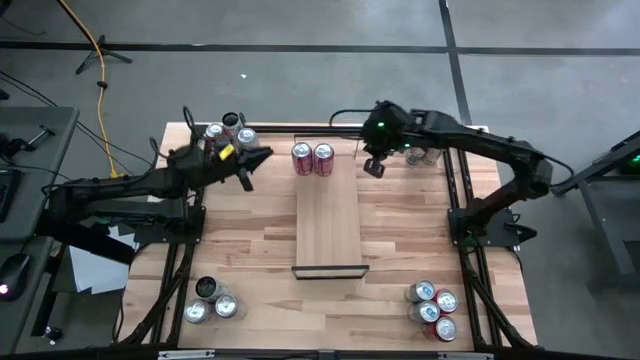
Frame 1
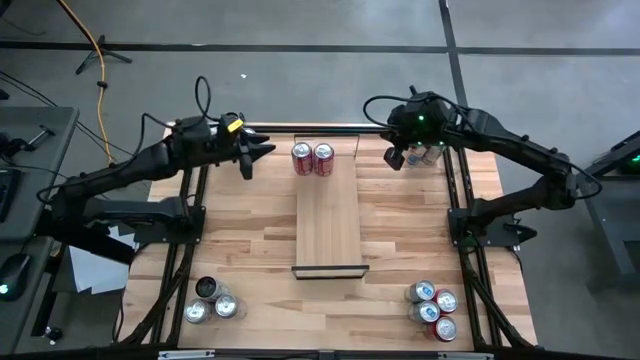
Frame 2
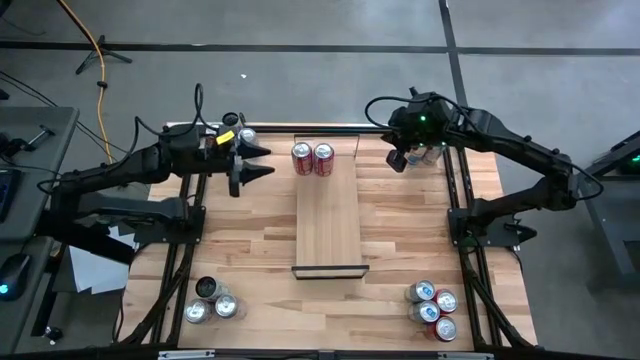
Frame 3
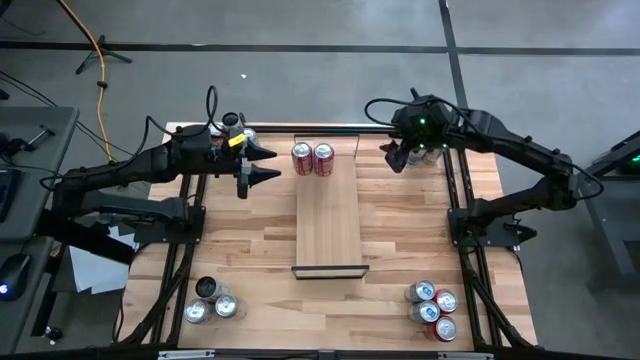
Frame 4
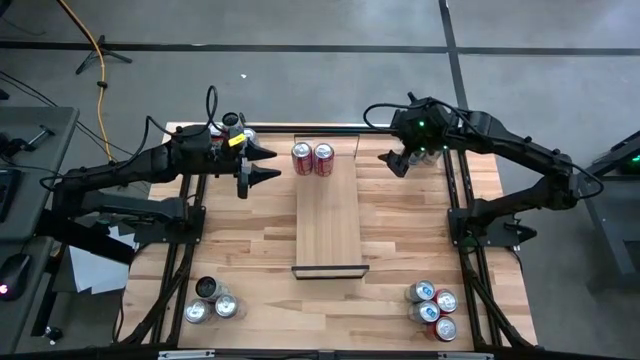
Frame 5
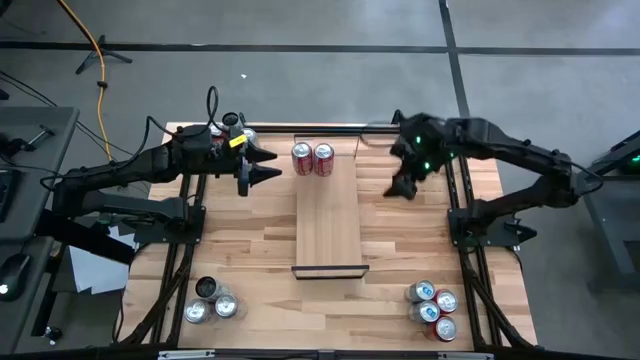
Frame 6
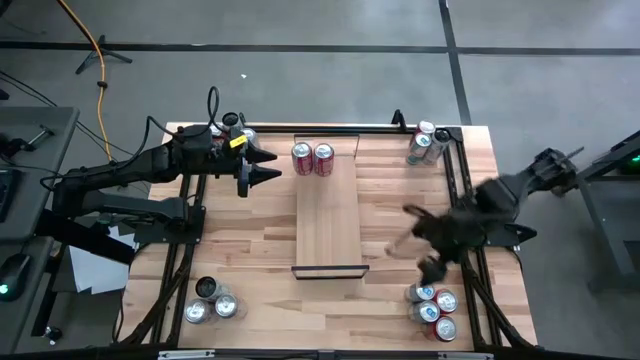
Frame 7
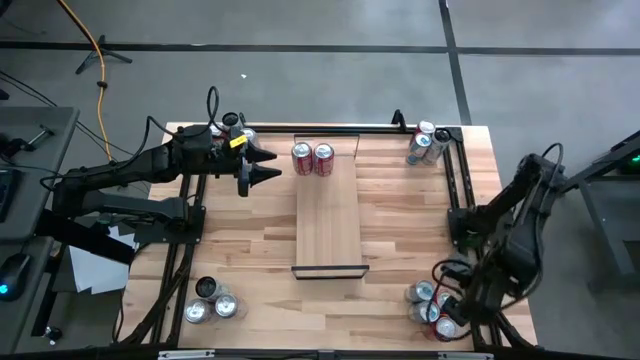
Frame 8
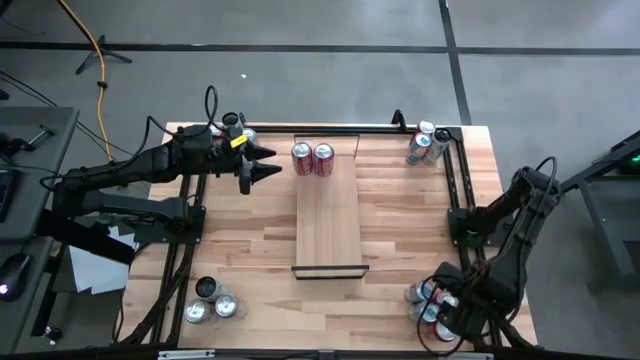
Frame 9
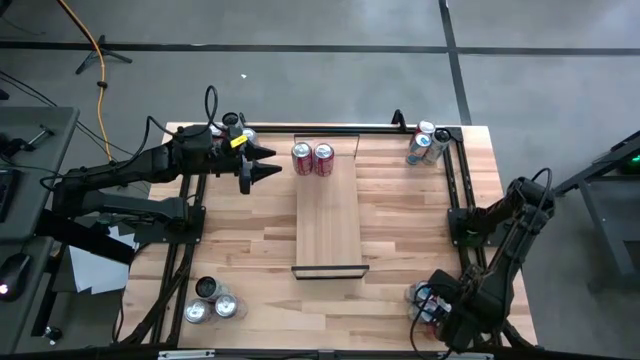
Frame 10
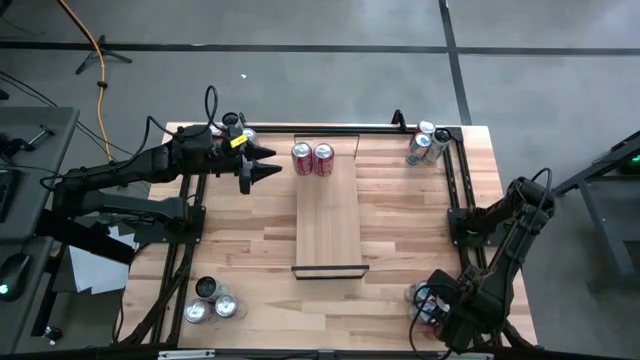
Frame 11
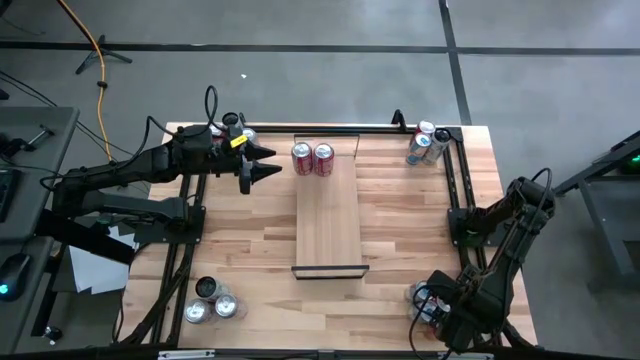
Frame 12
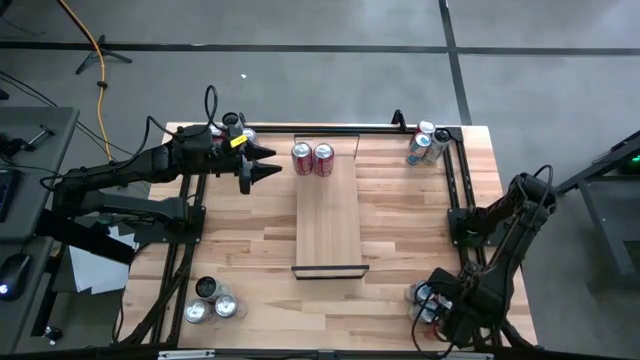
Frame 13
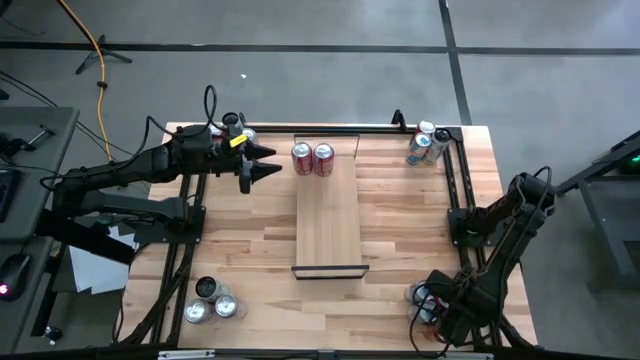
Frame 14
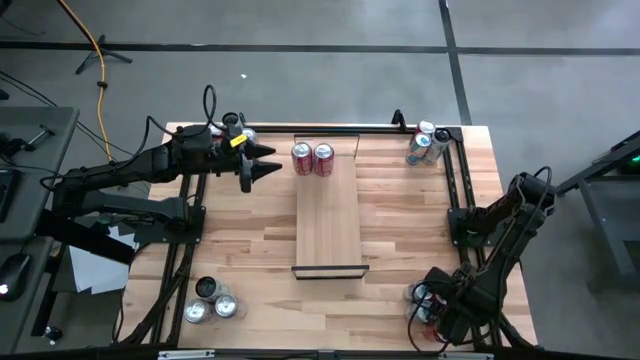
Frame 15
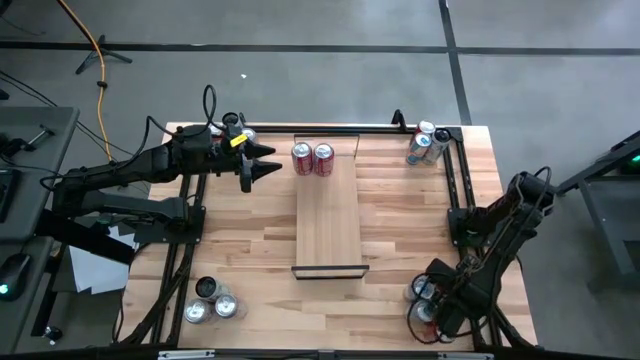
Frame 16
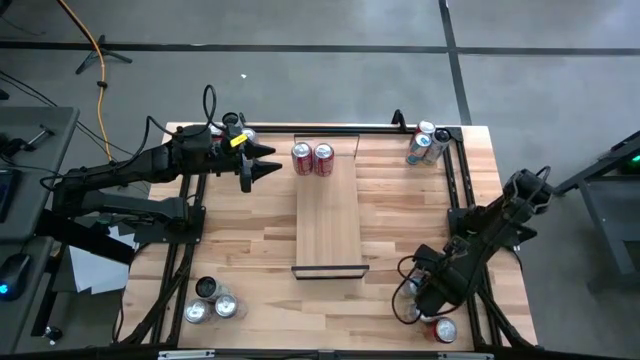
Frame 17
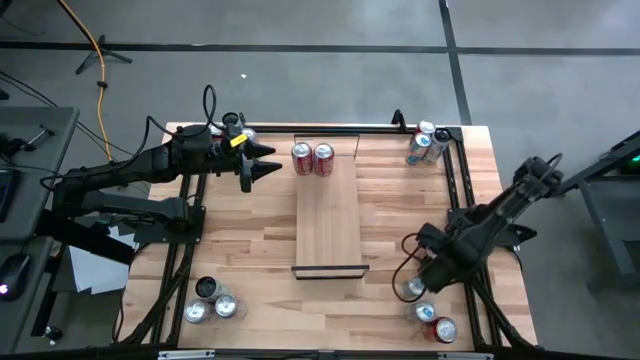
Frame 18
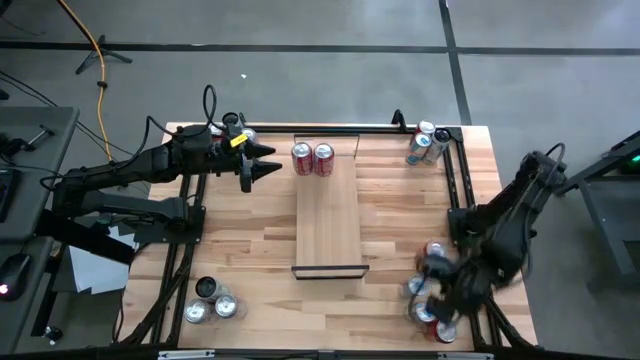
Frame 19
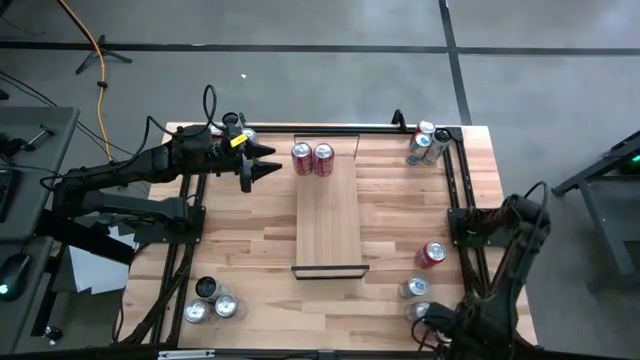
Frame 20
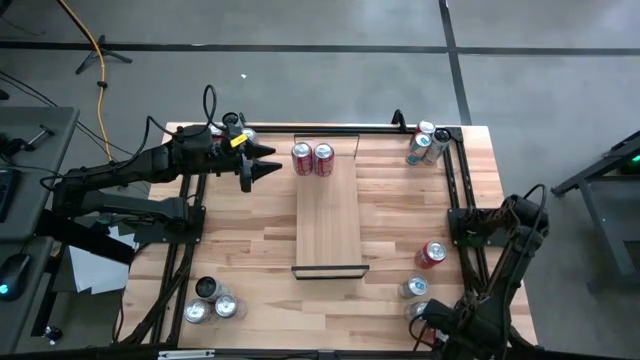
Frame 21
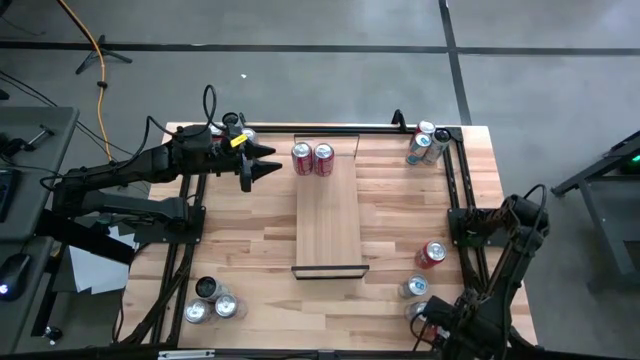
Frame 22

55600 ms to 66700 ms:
Task: Place canned beverage on shelf
Put the red soda can on the shelf aligned with the other red soda can

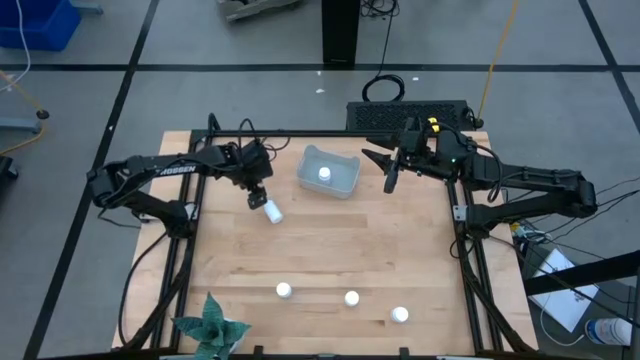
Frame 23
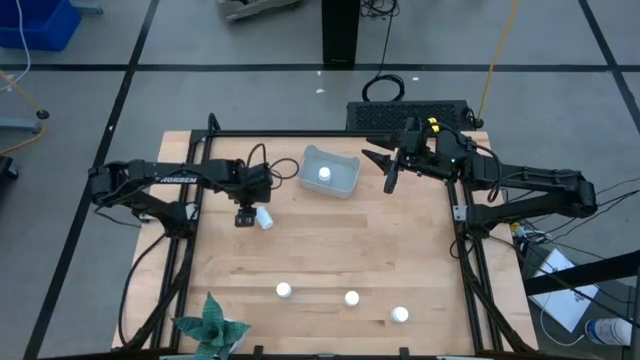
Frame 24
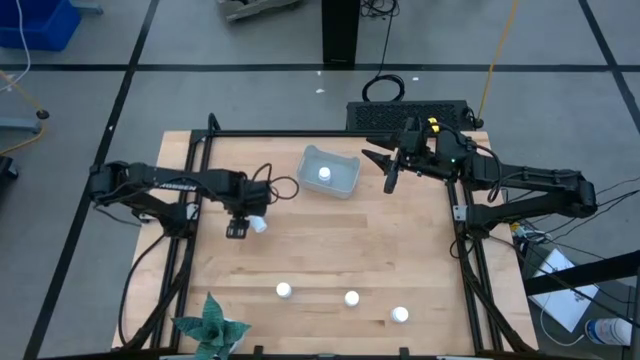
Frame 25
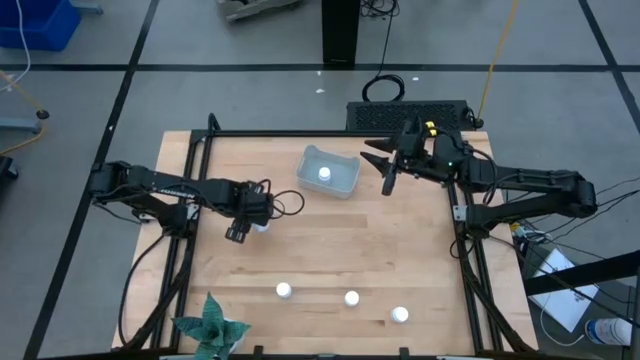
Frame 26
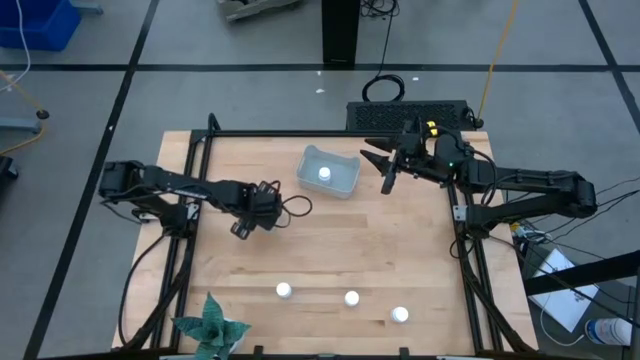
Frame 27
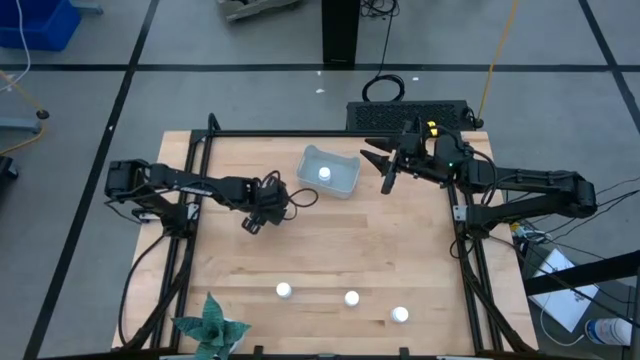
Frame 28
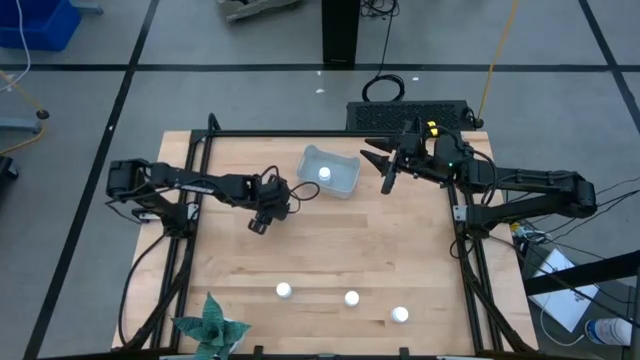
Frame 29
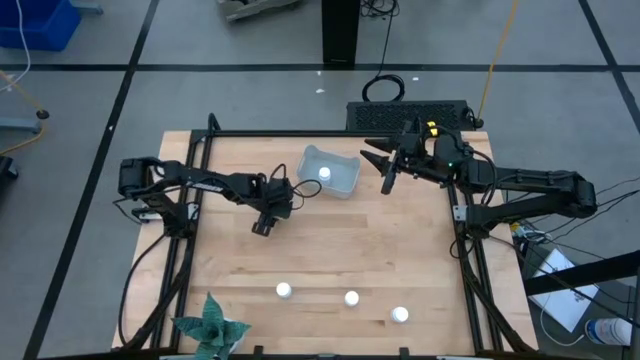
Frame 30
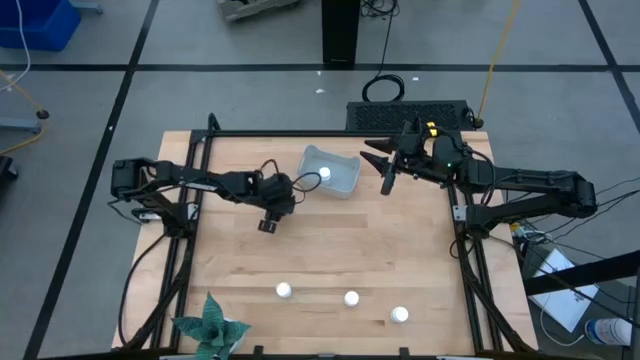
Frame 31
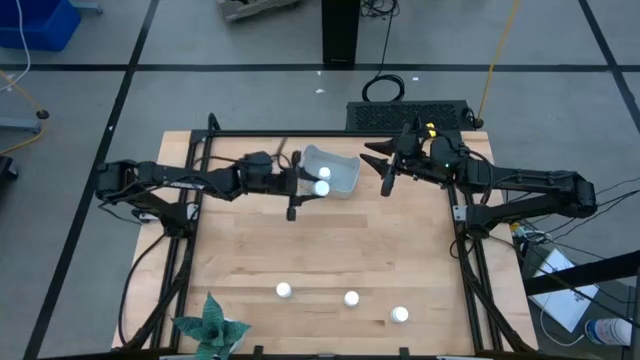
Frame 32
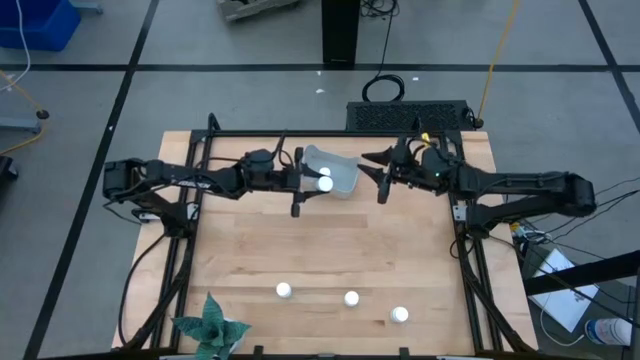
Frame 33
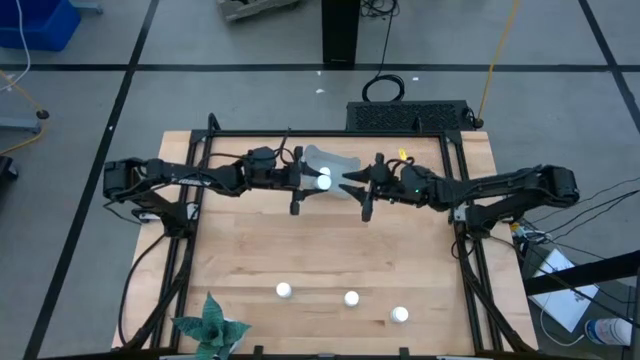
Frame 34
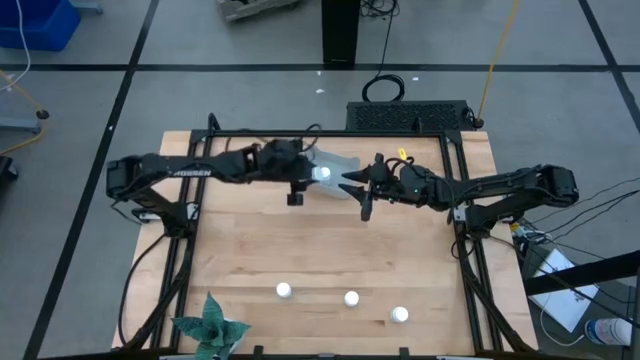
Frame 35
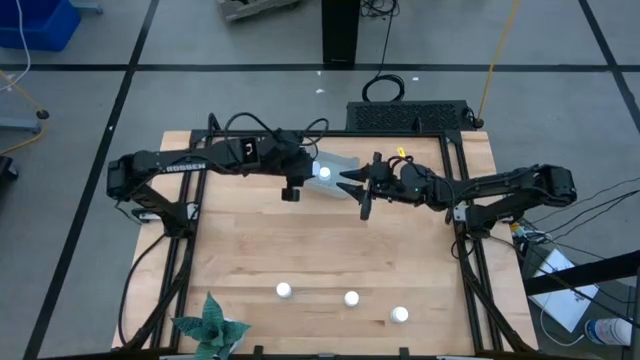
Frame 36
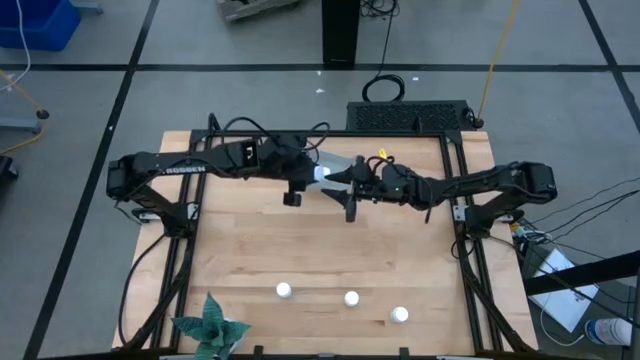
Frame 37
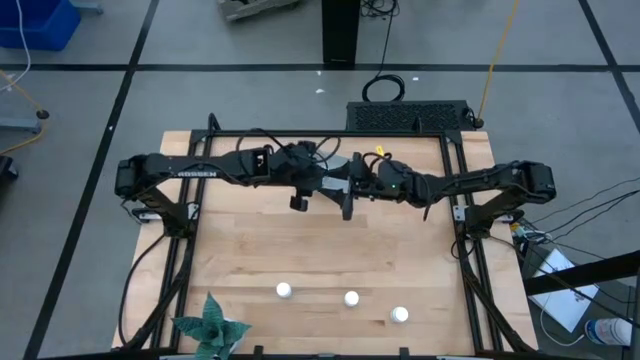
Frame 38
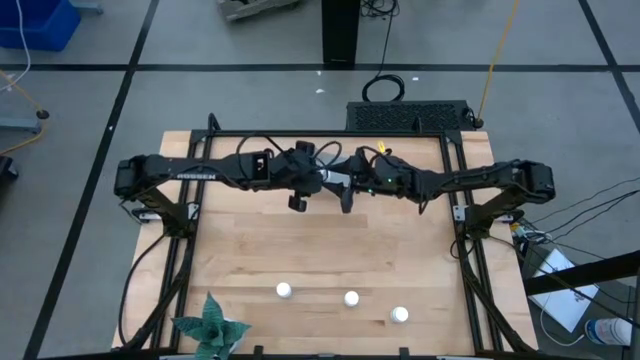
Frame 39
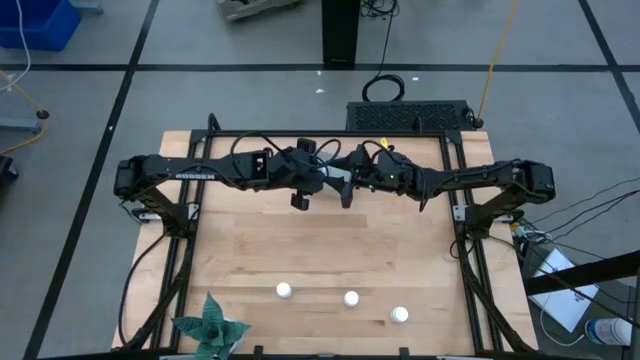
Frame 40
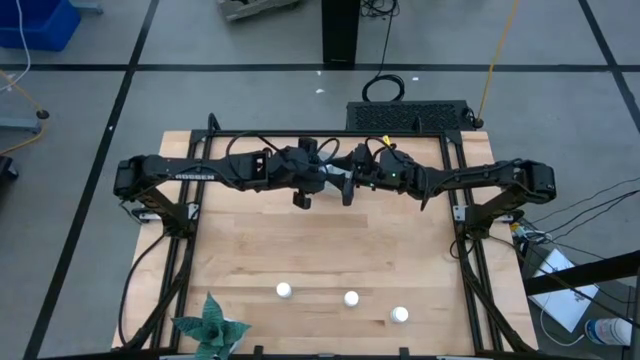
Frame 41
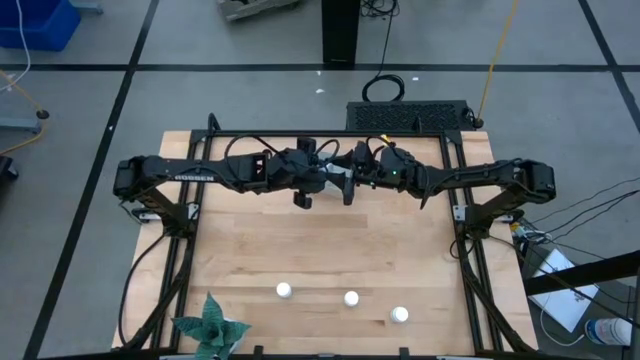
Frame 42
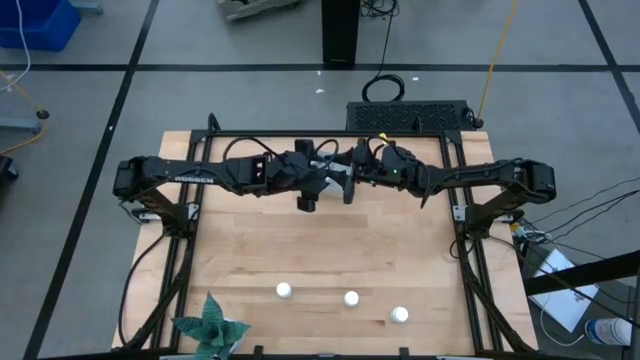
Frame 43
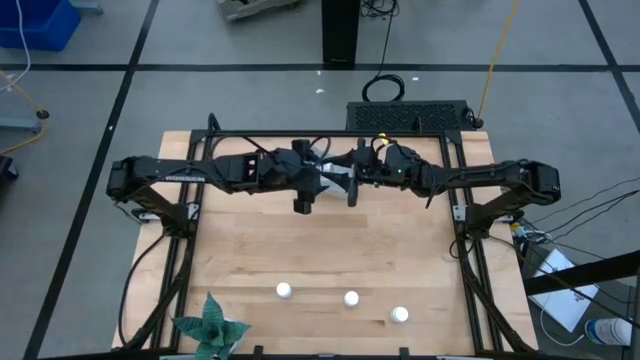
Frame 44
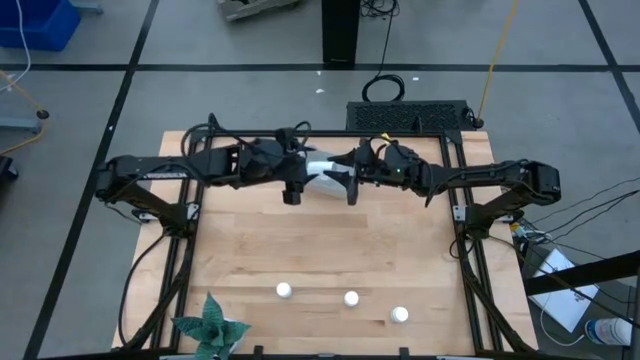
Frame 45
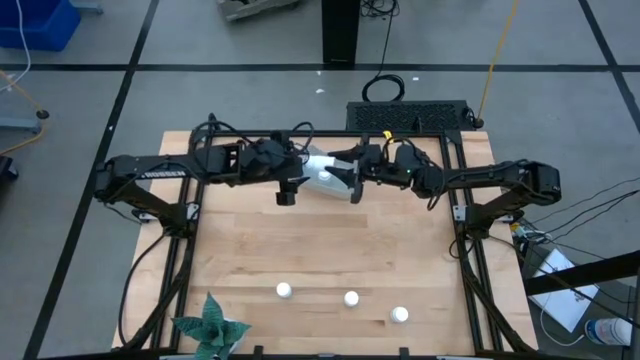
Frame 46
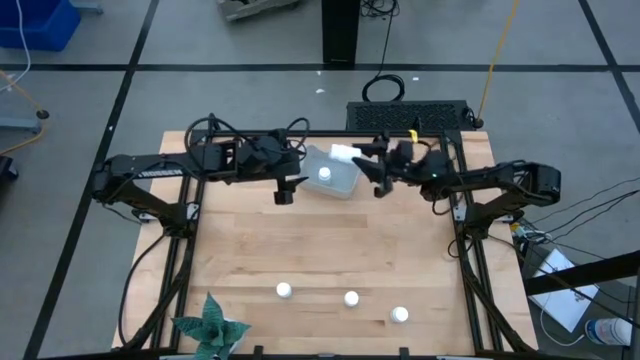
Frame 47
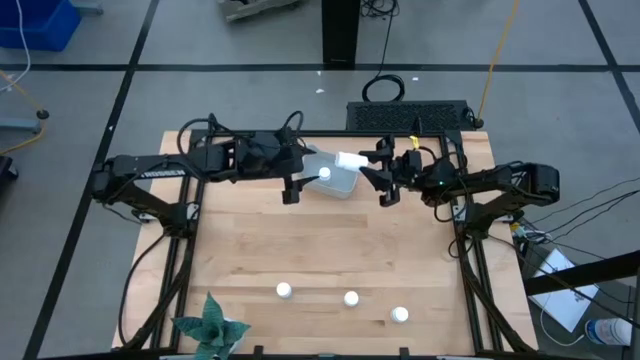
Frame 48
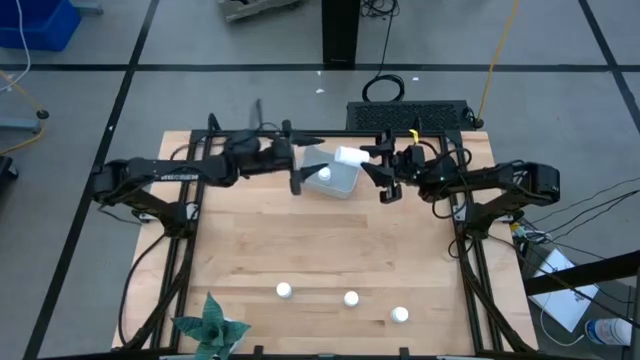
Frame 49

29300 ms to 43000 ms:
Task: Pick and place pill bottles into a basket
Put the white pill bottle into the gray bin
